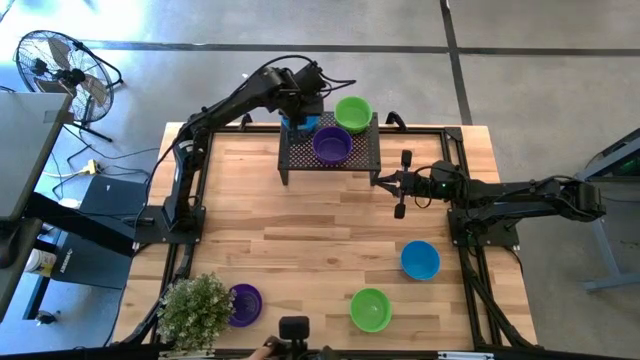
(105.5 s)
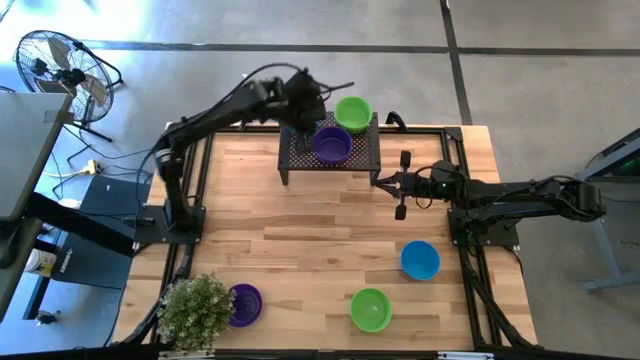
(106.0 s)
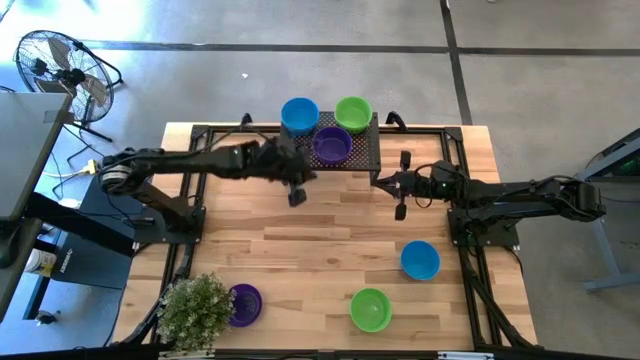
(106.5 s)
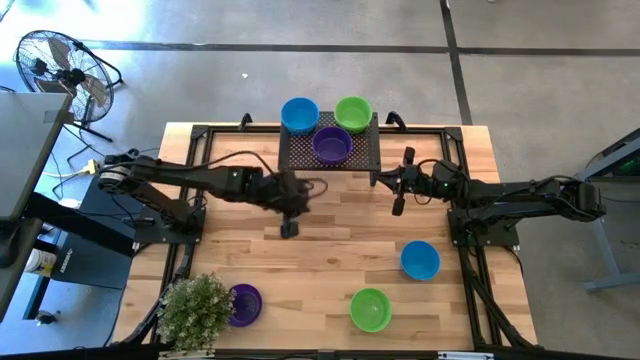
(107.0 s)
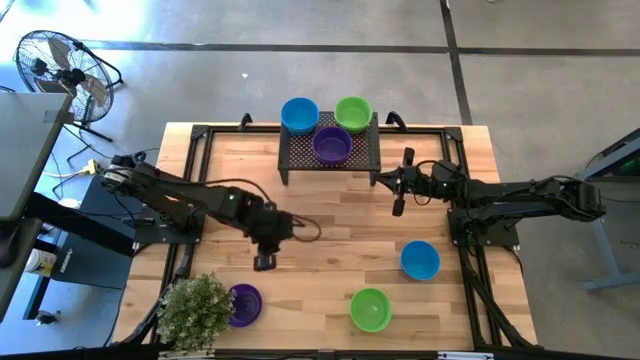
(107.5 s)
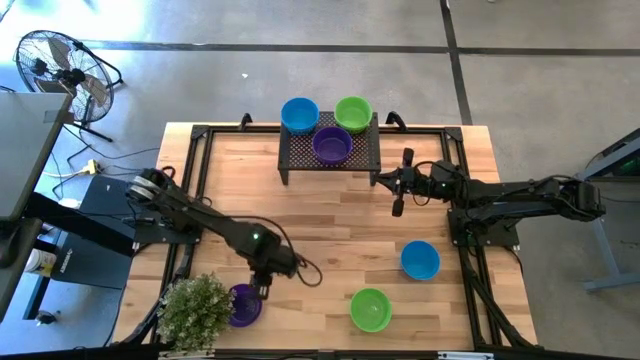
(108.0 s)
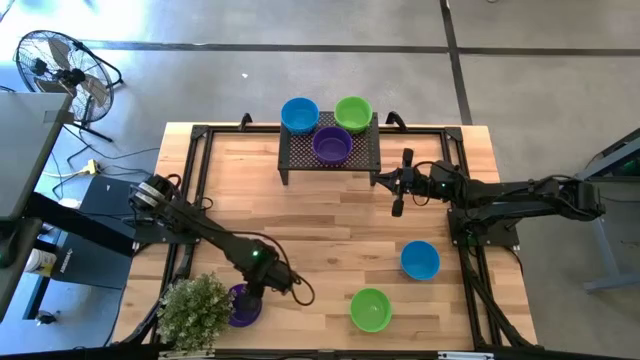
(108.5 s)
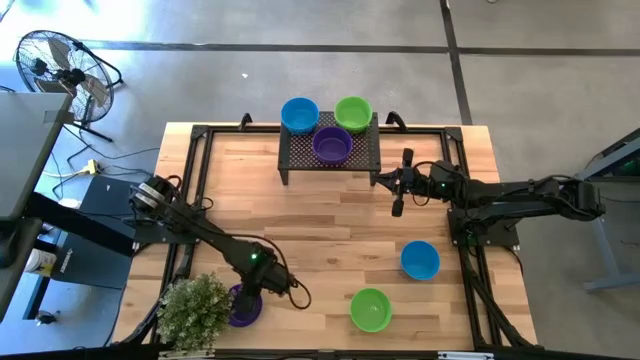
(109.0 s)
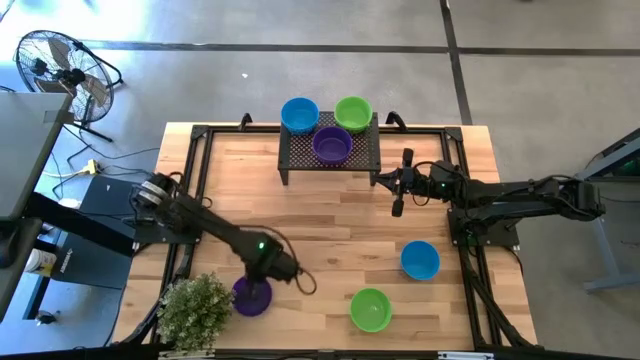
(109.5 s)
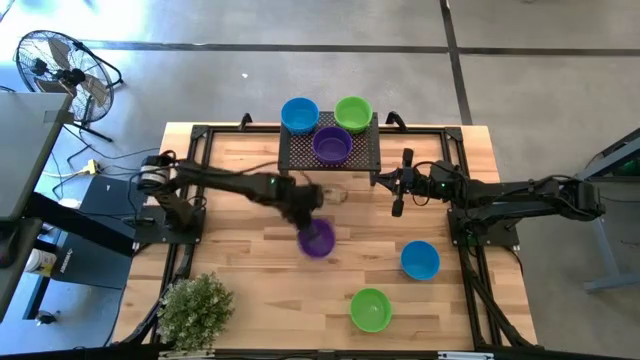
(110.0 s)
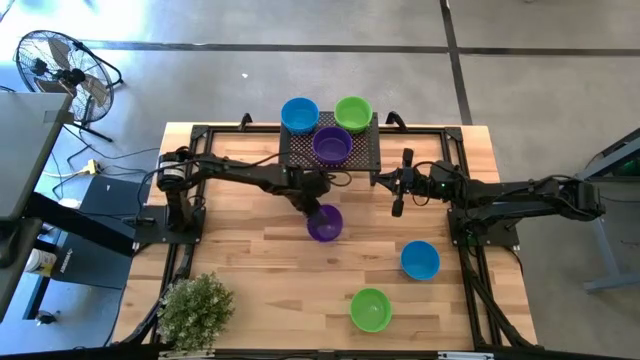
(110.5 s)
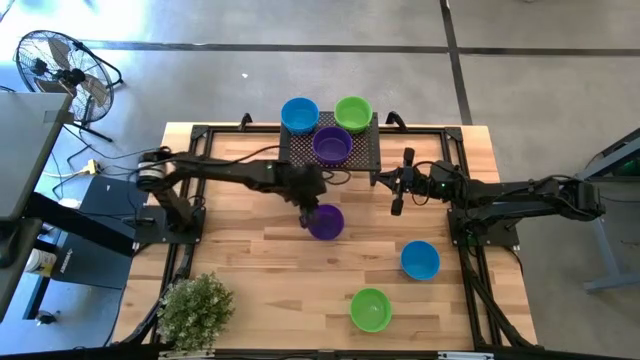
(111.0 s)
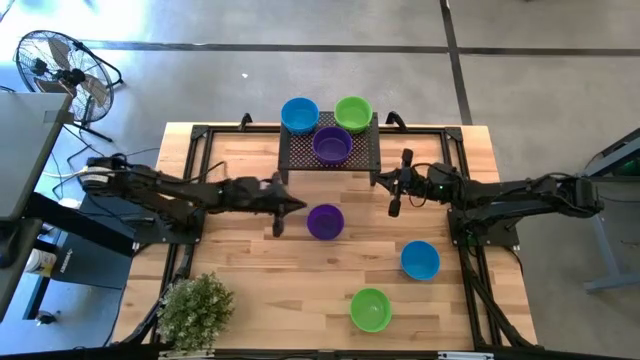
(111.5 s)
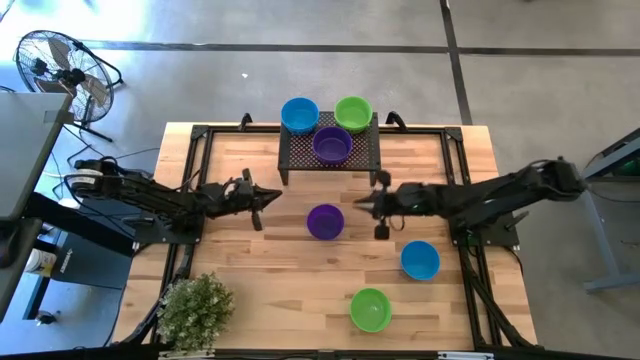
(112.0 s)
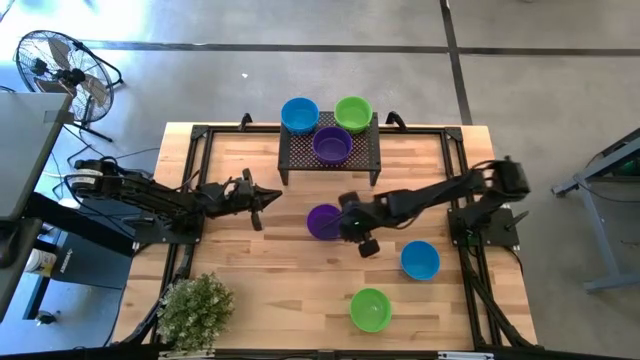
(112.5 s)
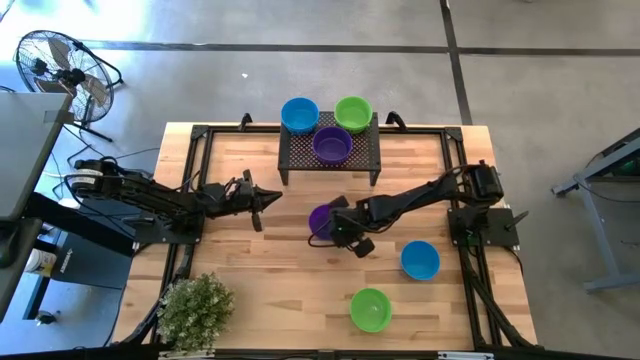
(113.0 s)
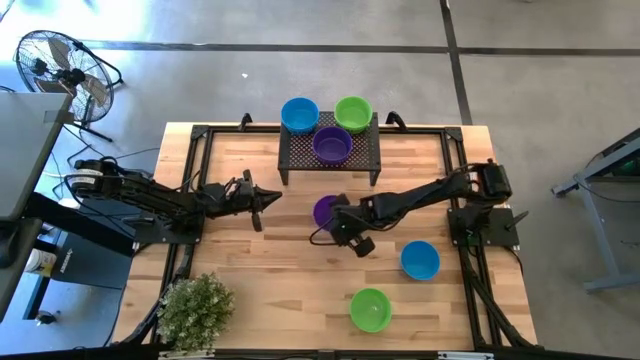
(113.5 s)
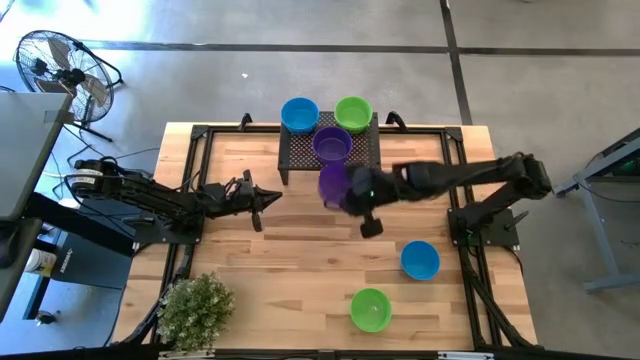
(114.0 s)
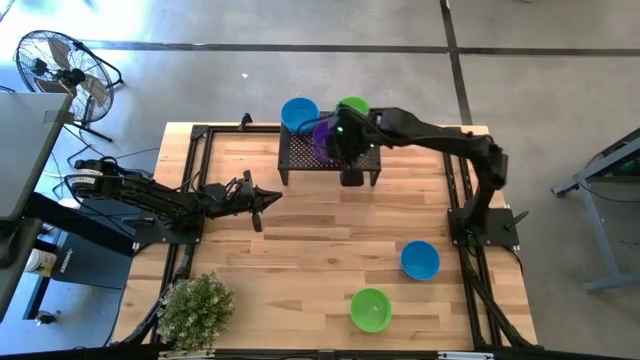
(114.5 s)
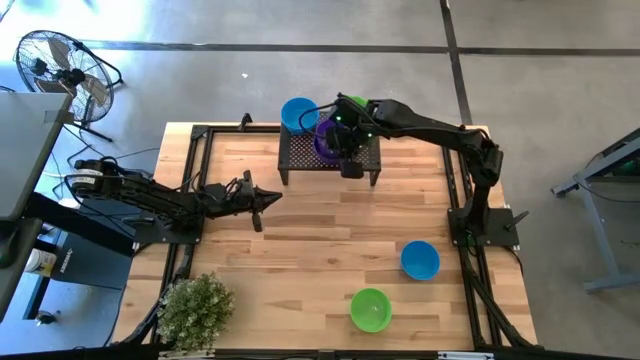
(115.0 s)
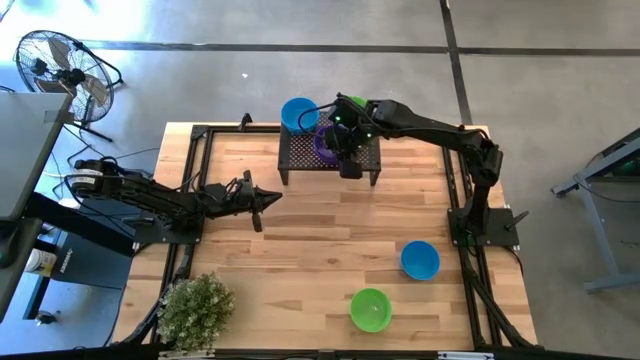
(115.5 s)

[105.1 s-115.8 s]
Task: Pick & Place Mini bowls
Stack the violet bowl on the violet bowl on the shelf

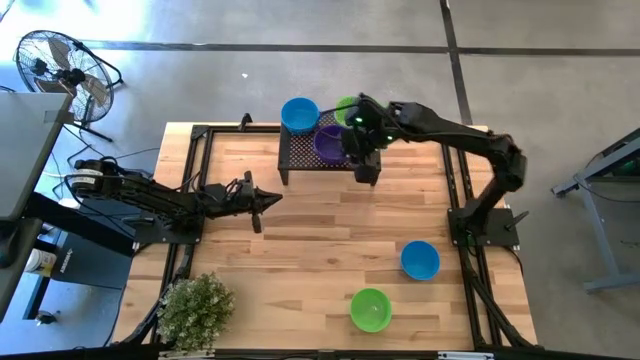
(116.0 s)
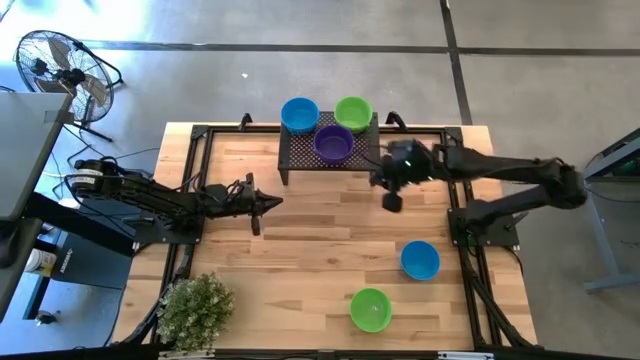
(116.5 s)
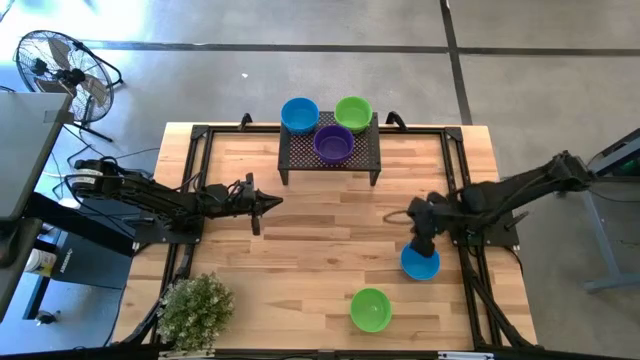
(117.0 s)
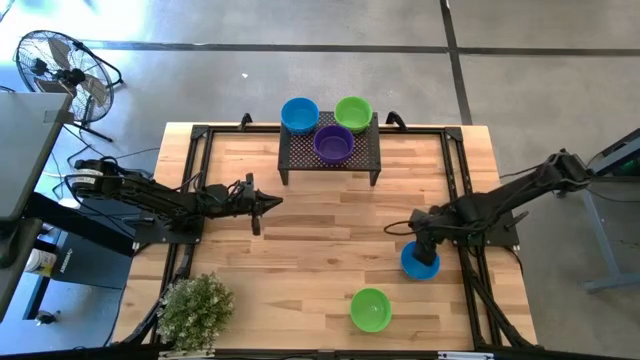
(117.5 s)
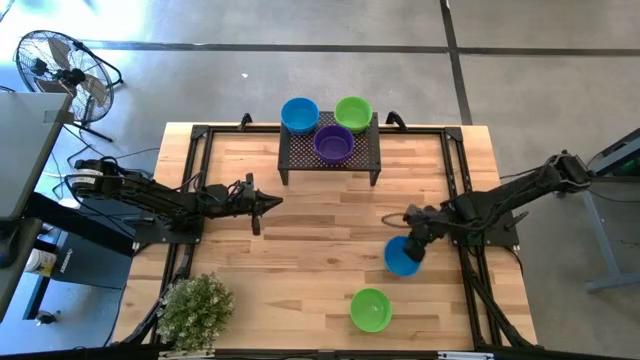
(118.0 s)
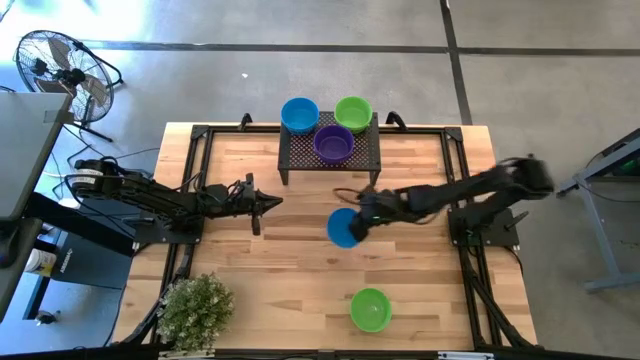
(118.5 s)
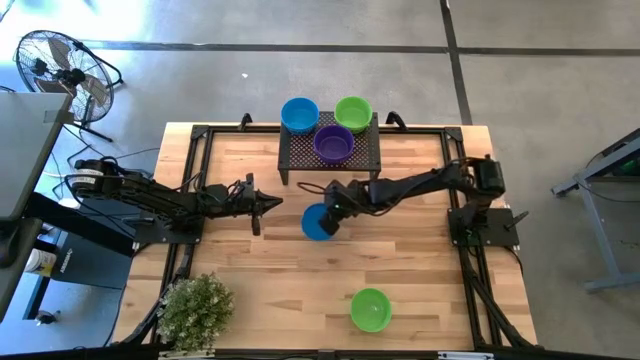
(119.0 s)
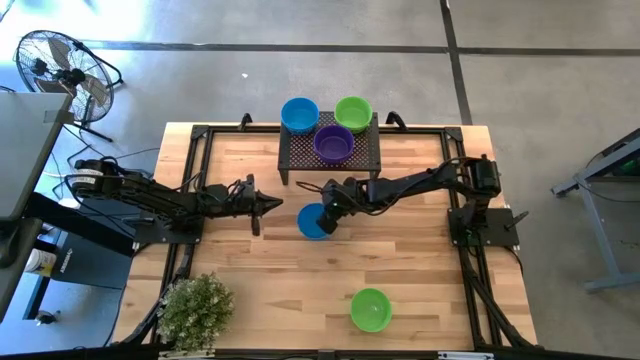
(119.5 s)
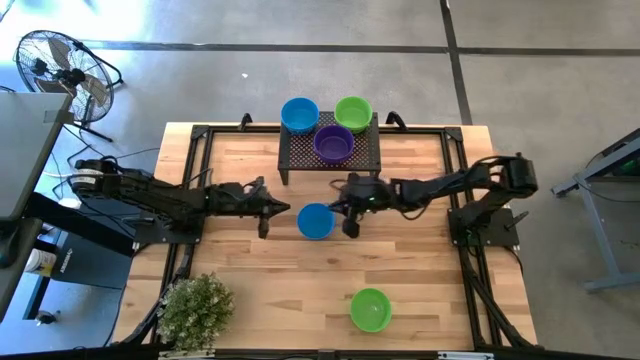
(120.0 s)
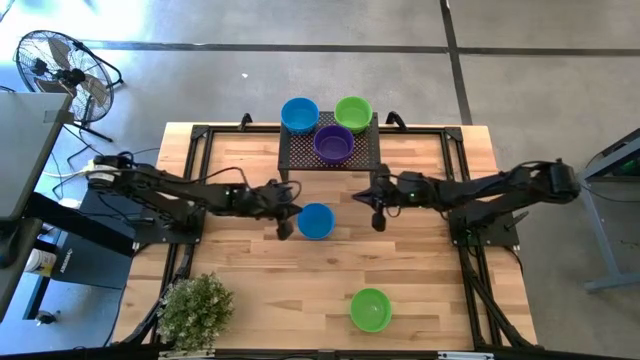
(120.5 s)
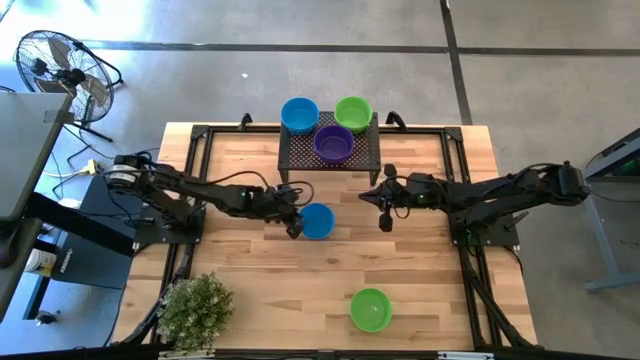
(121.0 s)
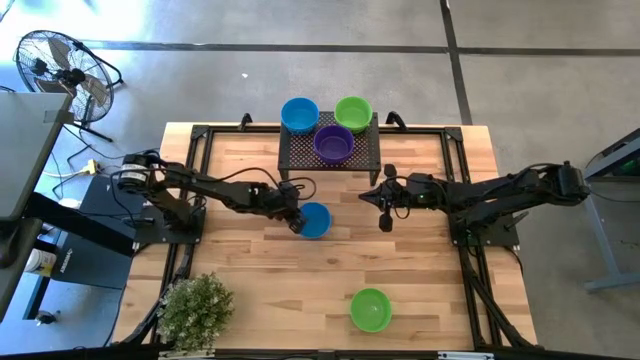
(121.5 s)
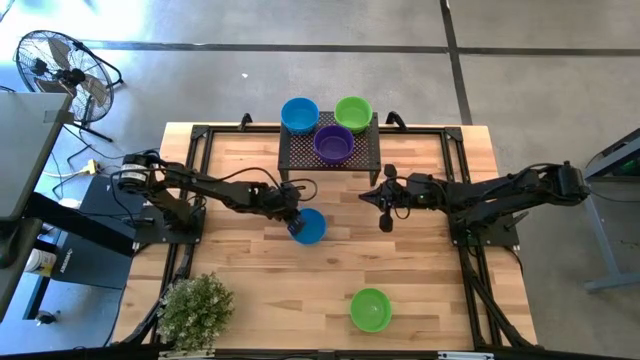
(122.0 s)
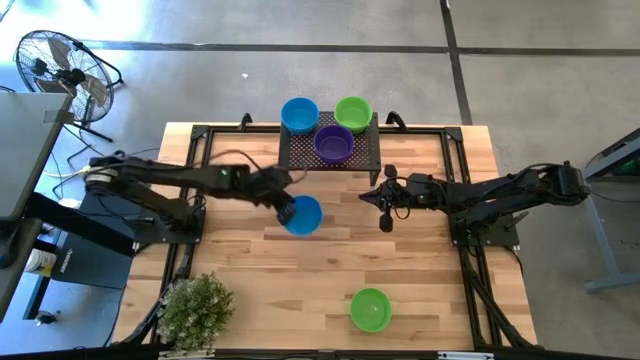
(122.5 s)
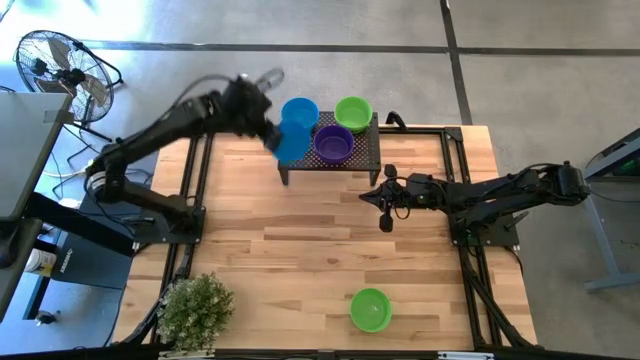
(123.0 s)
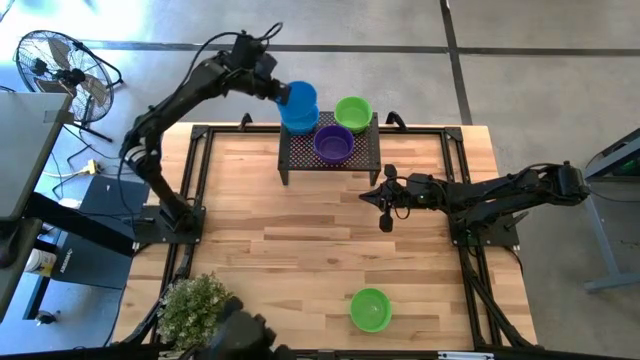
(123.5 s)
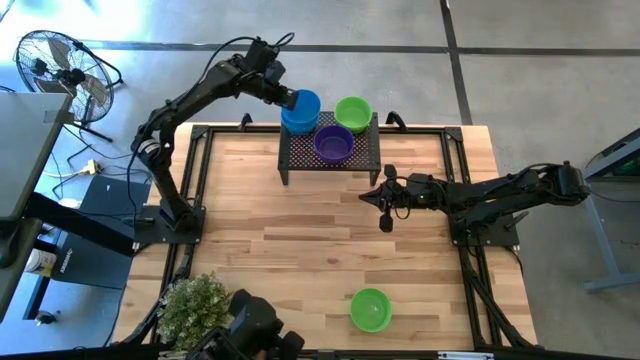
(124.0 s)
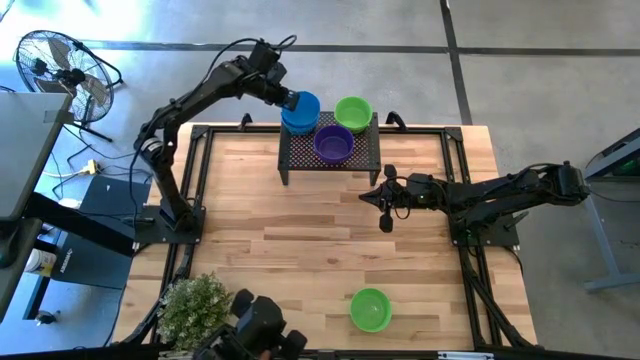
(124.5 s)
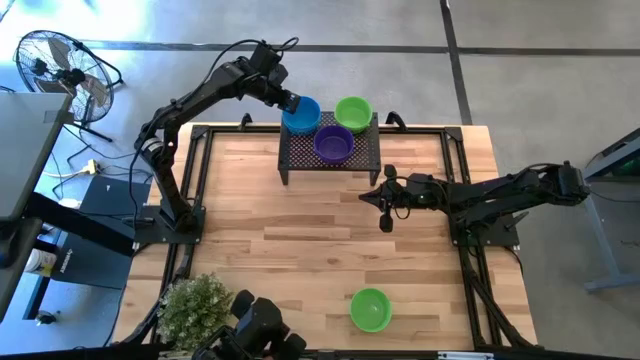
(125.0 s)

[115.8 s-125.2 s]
Stack the blue bowl on the blue bowl on the shelf

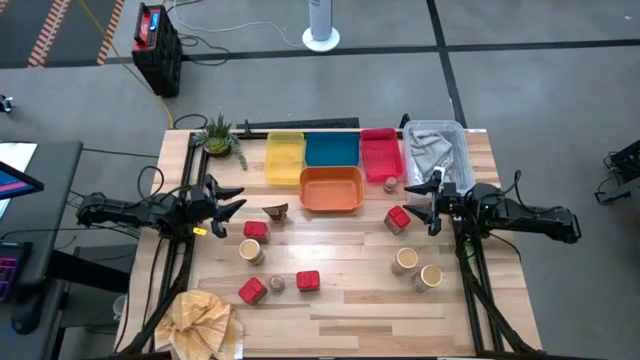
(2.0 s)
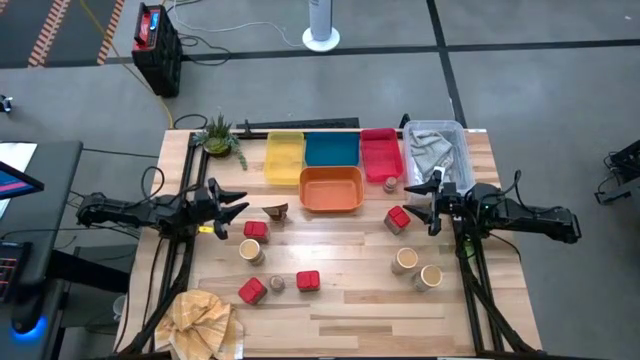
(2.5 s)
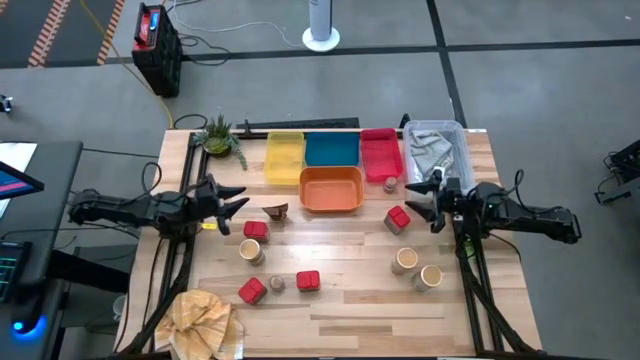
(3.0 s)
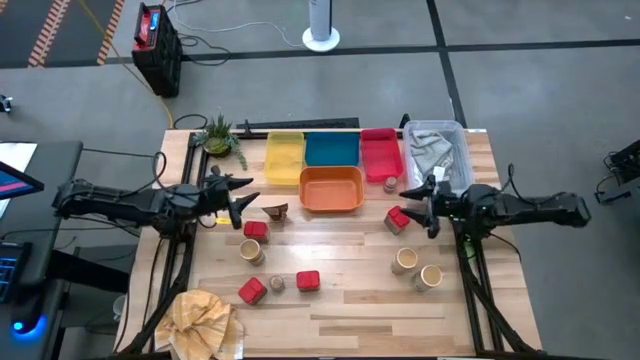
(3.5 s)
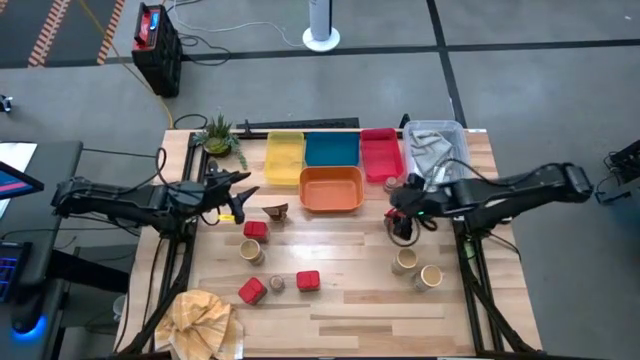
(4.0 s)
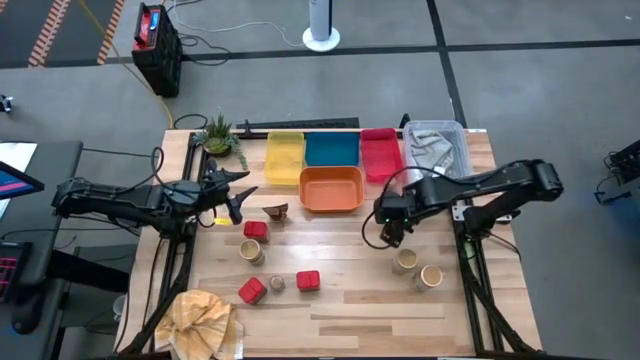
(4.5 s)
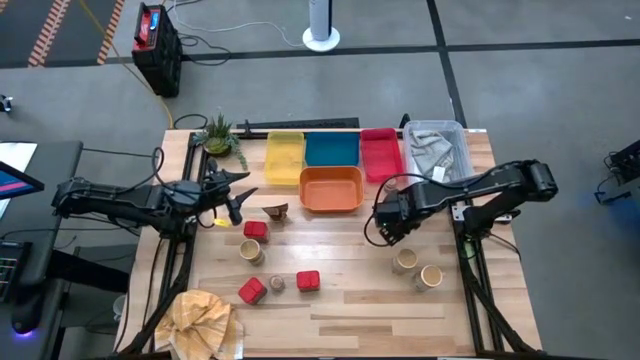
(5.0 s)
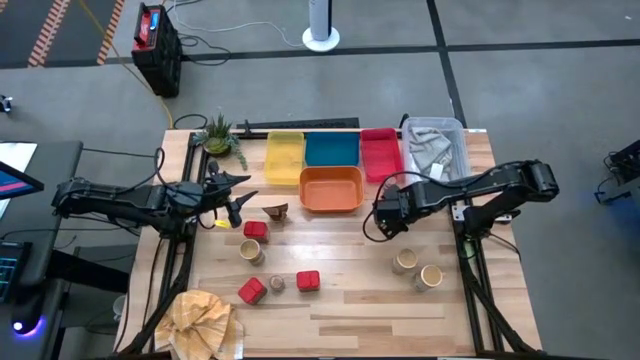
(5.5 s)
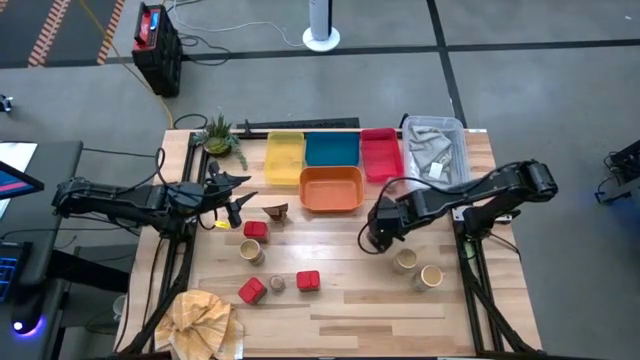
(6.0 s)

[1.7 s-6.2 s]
Task: Sort spices by type
Put the red seasoning can into the blue bin
